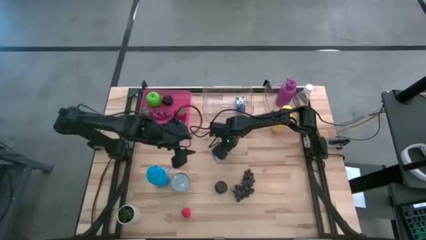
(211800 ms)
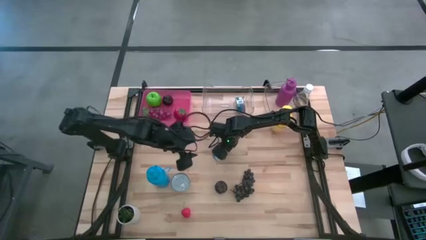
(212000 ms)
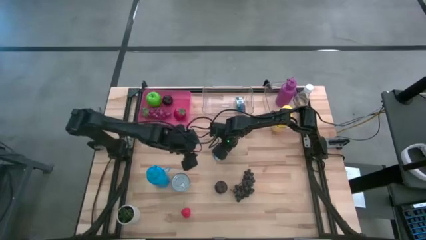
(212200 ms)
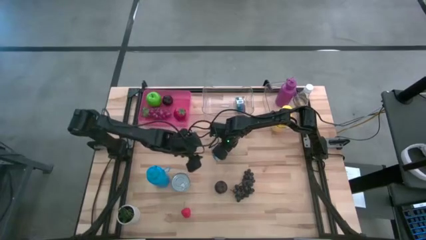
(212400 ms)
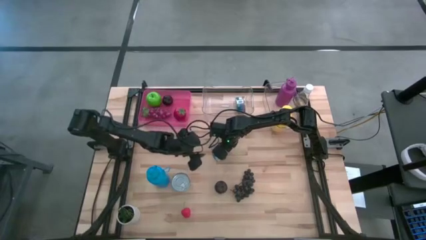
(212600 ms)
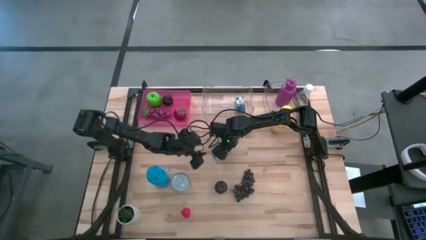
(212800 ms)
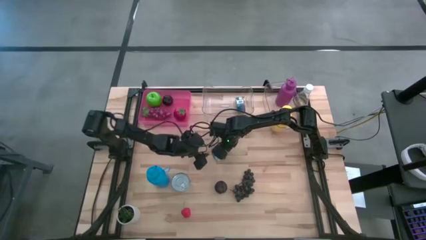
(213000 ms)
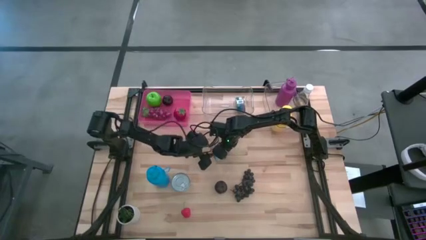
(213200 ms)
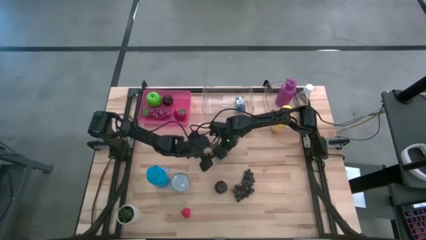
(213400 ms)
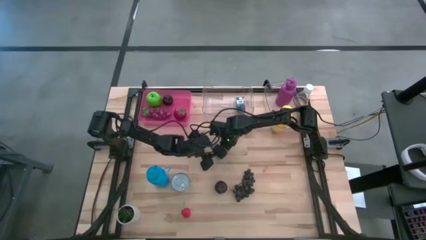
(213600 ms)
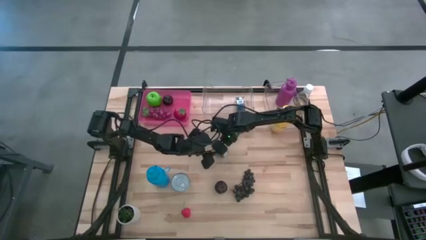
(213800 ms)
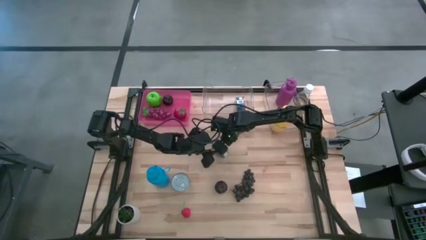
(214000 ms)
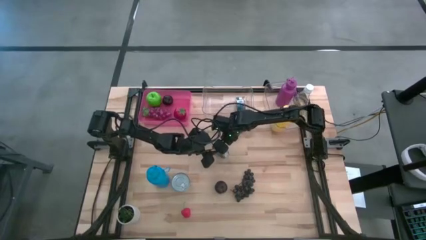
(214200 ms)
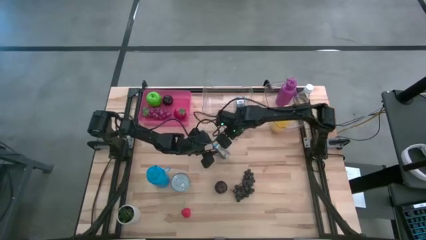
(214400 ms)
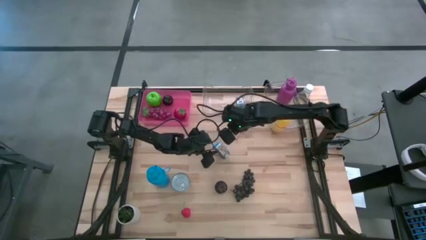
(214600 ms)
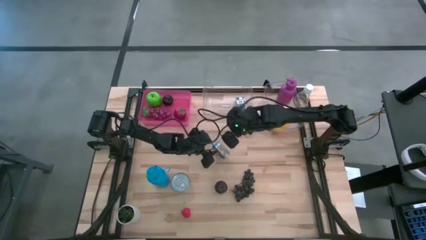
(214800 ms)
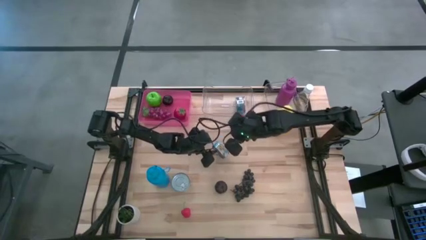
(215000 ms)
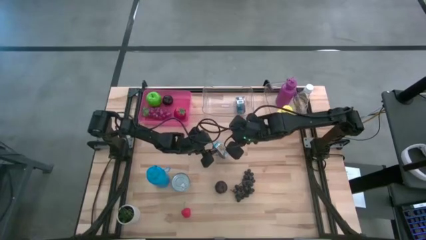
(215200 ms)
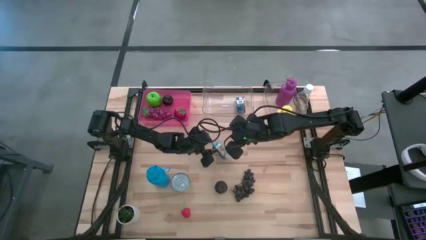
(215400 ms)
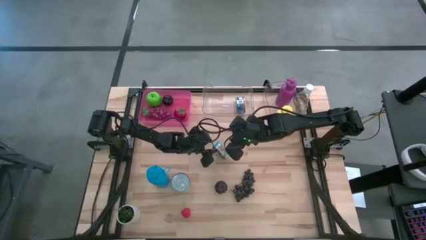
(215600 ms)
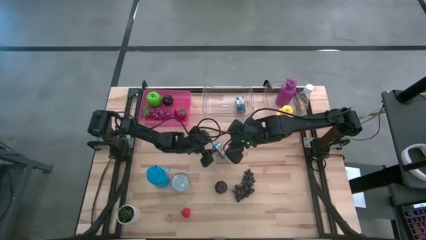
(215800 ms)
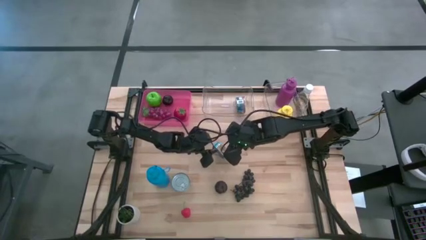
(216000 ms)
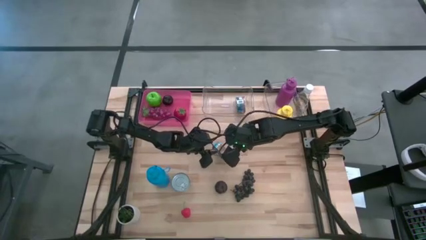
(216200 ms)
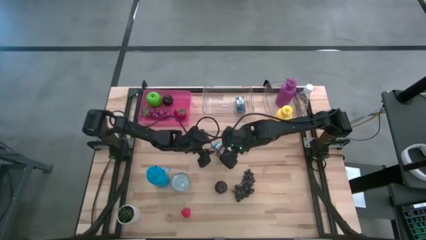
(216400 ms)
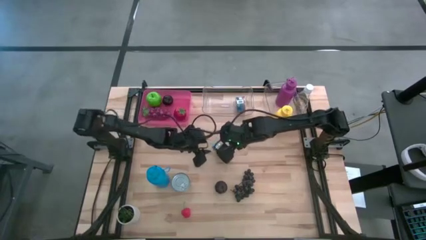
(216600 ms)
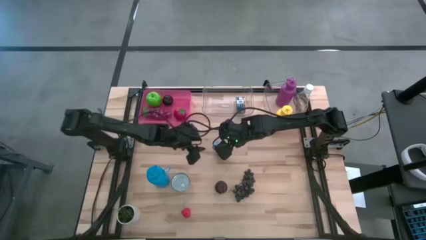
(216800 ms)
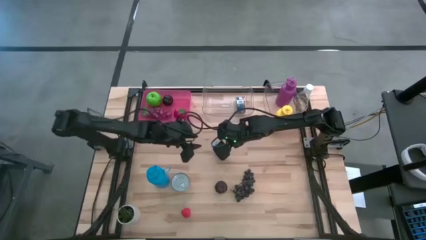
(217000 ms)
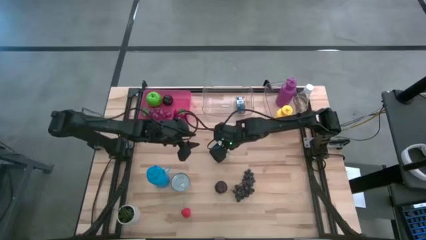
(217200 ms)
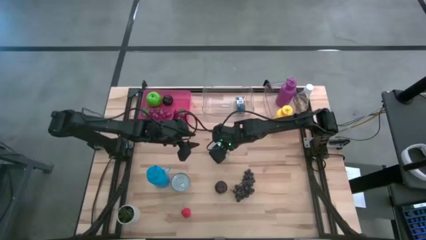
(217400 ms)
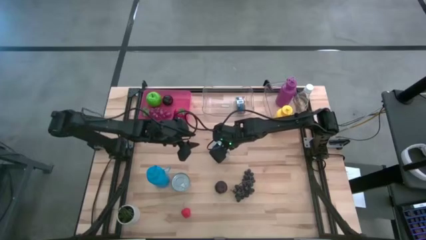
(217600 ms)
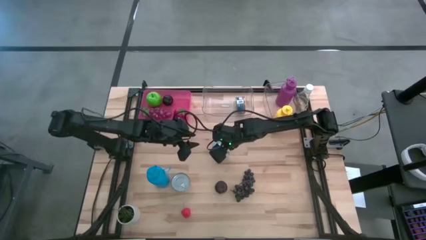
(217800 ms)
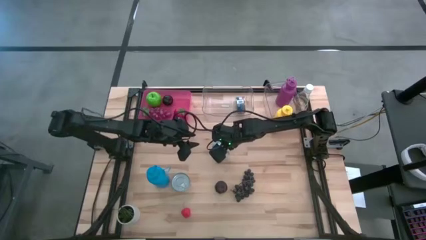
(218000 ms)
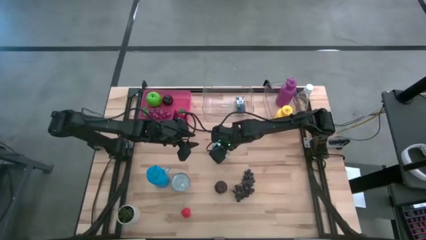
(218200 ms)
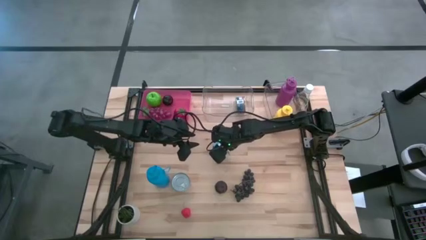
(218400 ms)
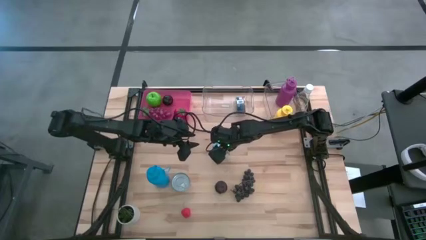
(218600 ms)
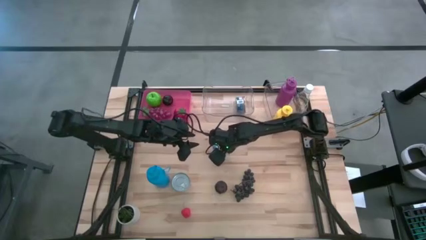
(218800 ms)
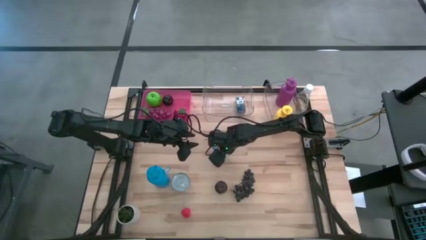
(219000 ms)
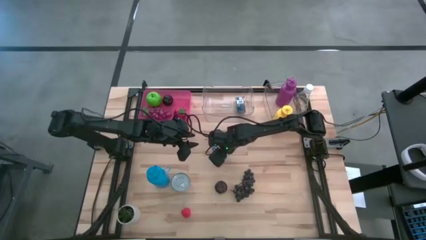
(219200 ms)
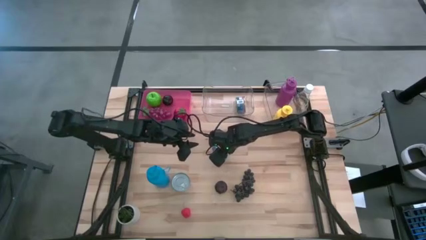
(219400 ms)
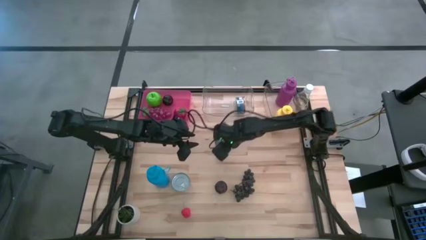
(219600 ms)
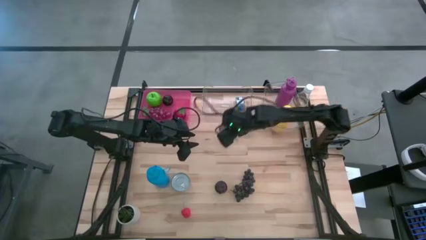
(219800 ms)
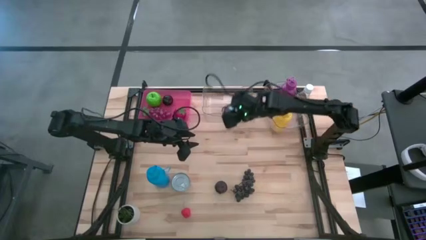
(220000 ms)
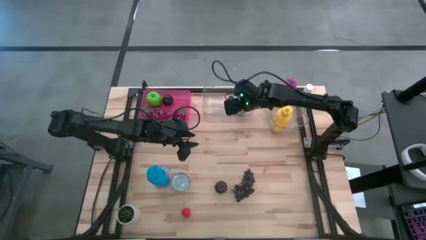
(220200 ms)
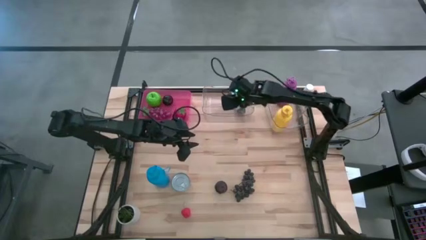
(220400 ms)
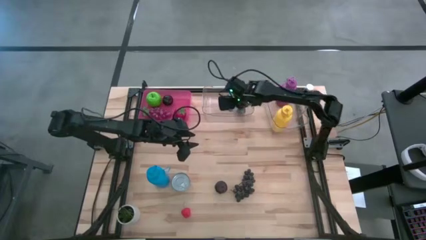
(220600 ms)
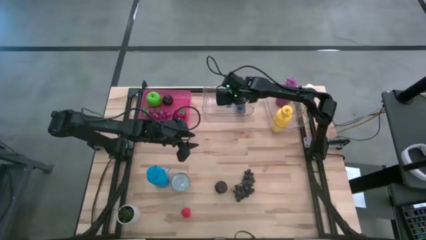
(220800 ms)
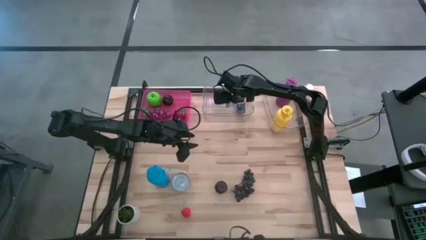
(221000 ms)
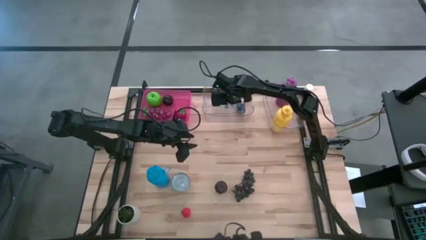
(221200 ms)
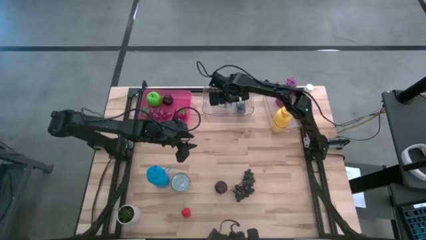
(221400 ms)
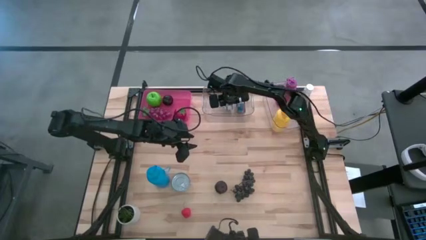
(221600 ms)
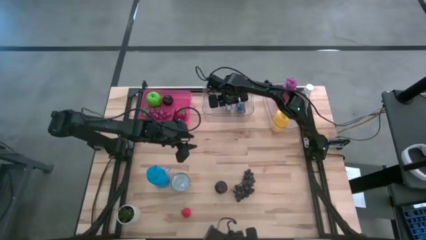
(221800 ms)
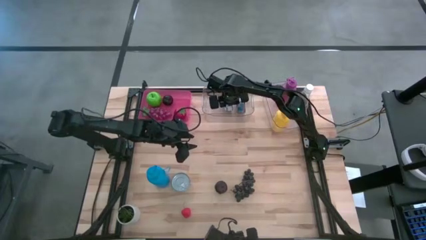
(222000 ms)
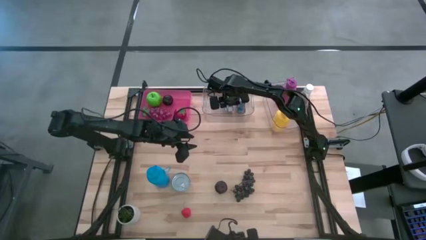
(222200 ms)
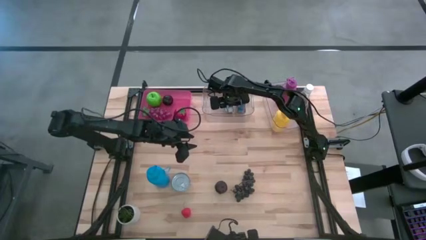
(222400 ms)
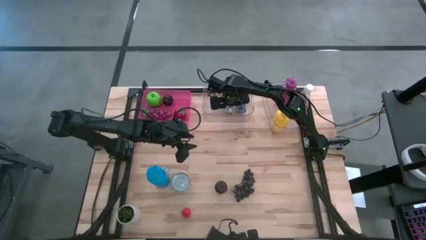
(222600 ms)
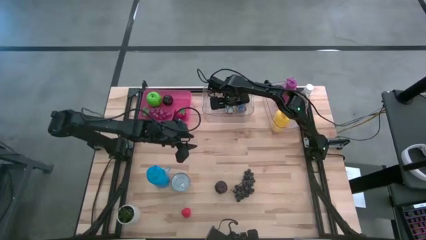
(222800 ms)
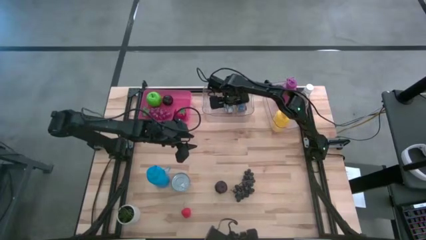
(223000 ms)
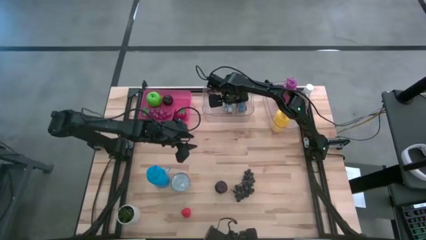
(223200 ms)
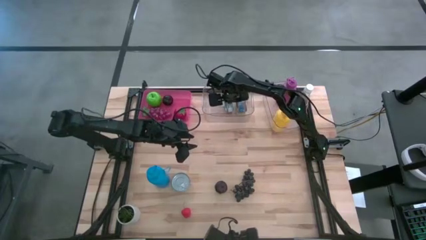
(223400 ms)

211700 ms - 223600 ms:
Task: Pick & Place Food Item
Put the yellow and blue tuna can into the left transparent bin

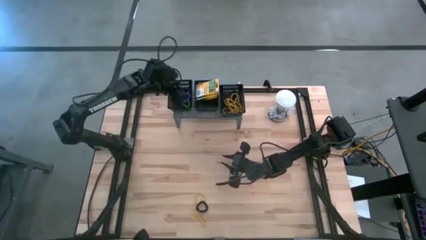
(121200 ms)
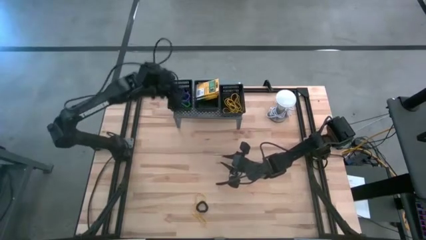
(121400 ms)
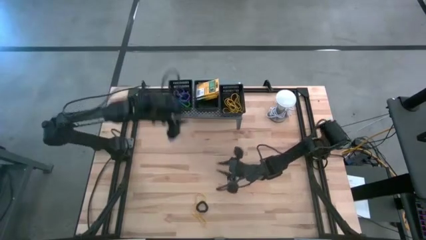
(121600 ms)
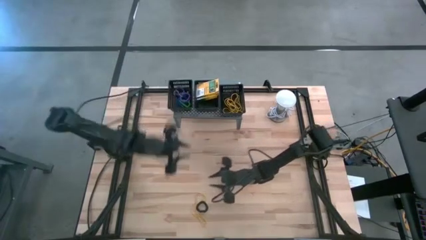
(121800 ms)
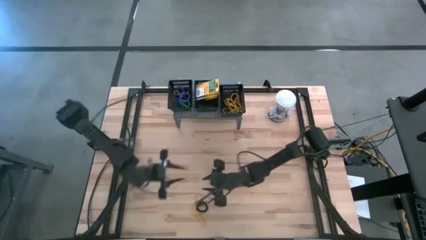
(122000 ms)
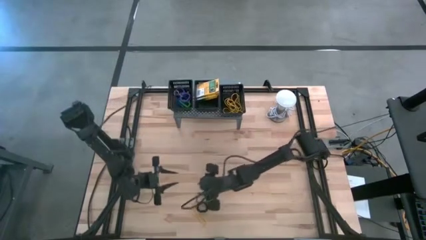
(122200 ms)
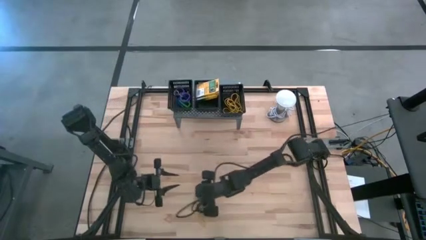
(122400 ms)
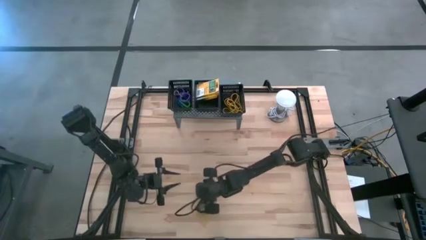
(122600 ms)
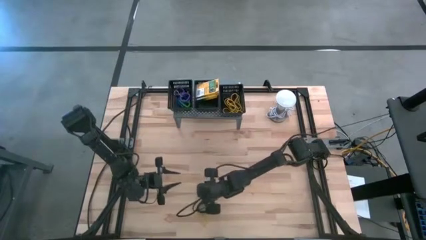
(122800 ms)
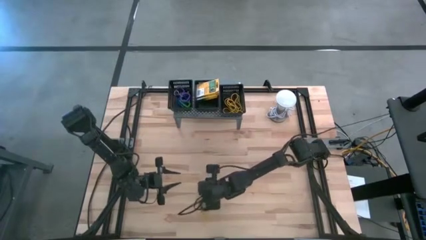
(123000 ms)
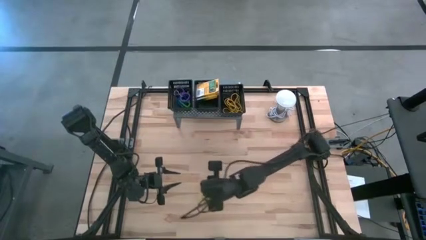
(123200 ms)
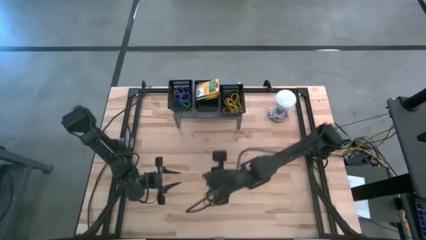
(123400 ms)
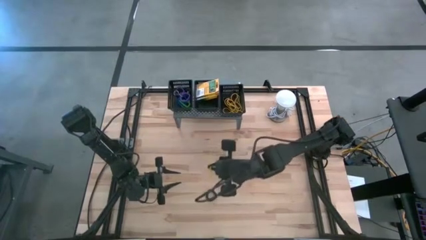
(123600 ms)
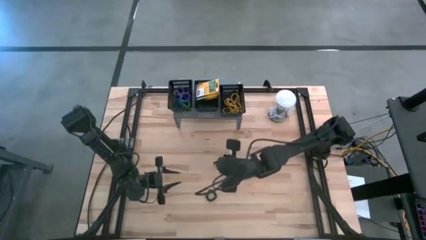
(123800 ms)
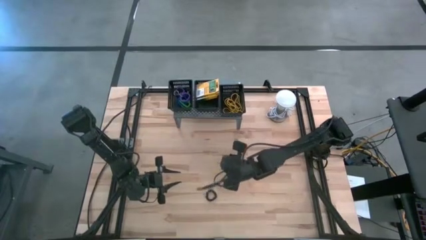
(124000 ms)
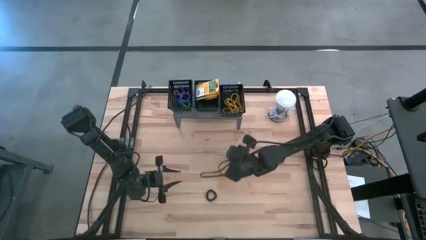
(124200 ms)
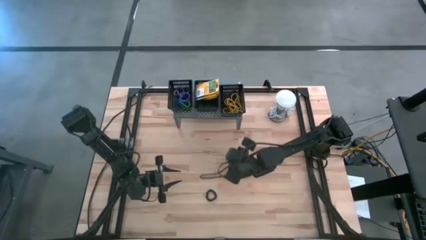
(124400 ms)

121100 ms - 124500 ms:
Task: Pick & Place Office Desk Supplies
Put the yellow rubber band into the right black bin on the shelf
